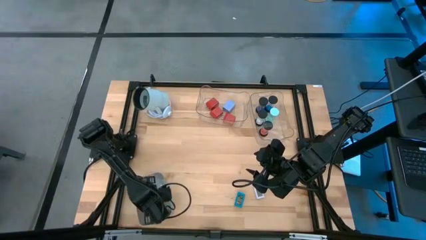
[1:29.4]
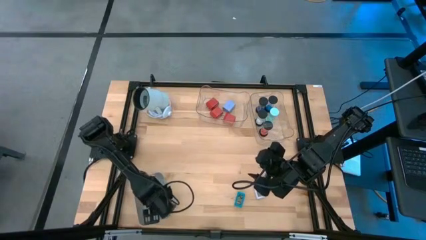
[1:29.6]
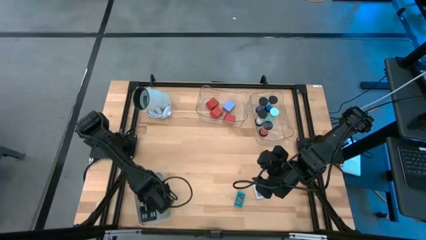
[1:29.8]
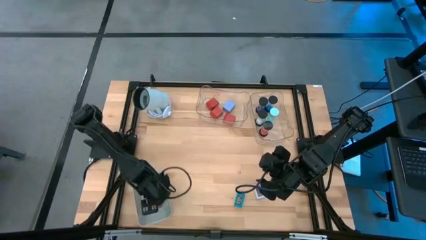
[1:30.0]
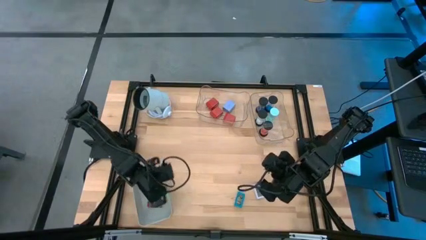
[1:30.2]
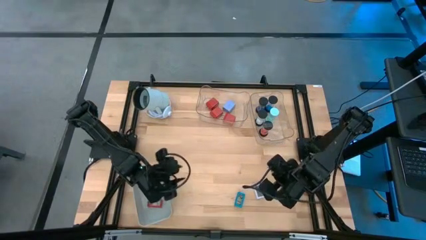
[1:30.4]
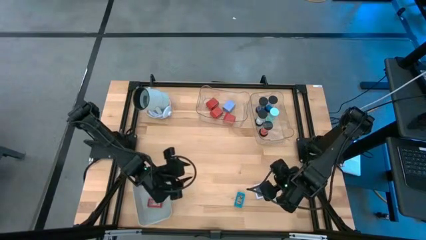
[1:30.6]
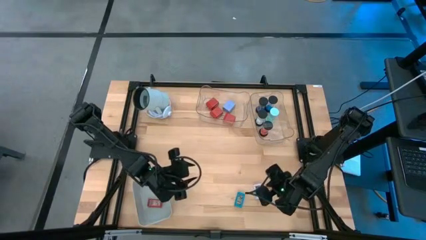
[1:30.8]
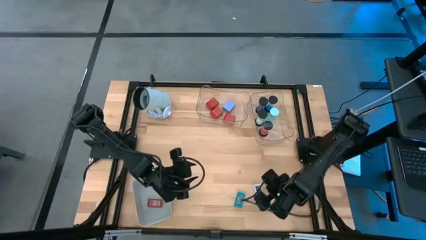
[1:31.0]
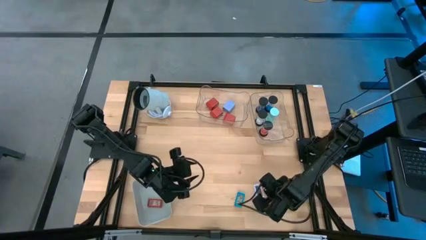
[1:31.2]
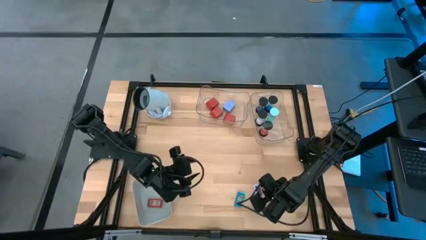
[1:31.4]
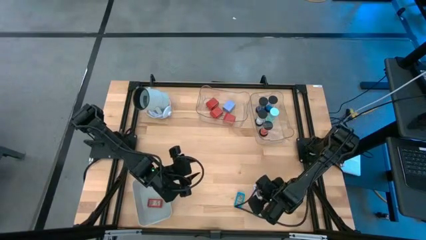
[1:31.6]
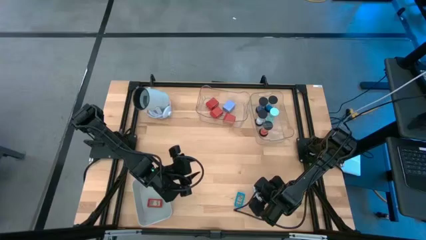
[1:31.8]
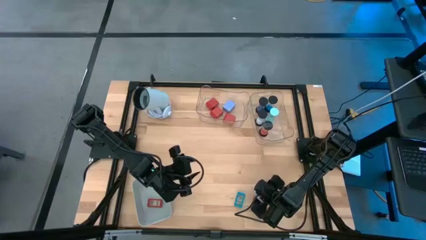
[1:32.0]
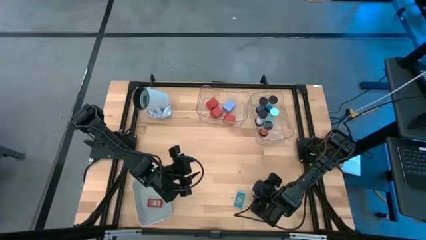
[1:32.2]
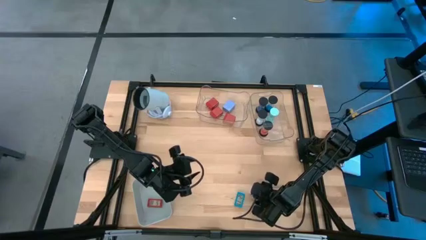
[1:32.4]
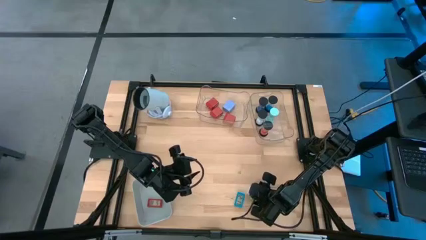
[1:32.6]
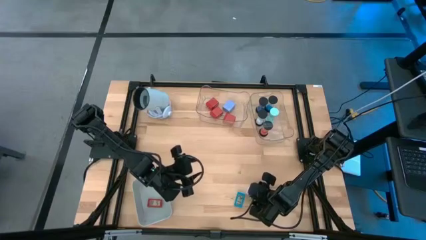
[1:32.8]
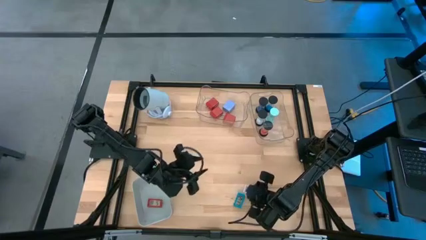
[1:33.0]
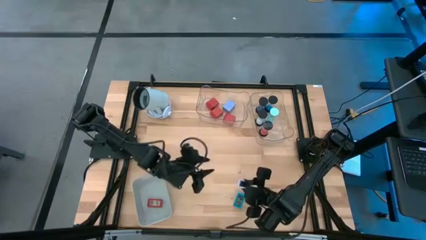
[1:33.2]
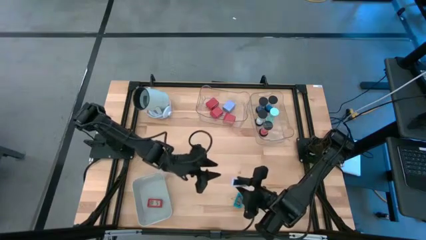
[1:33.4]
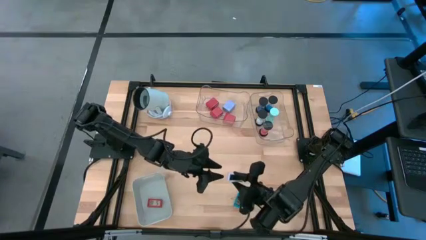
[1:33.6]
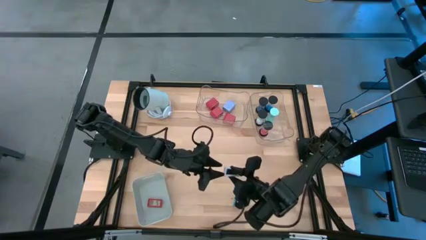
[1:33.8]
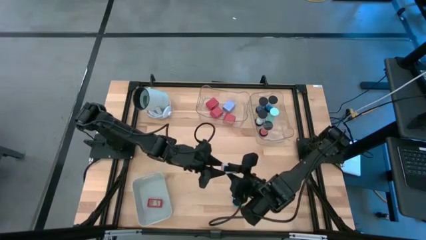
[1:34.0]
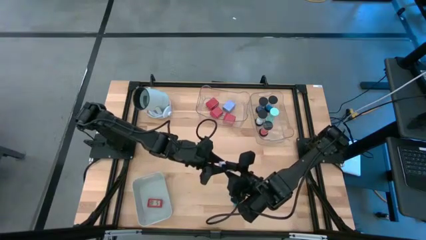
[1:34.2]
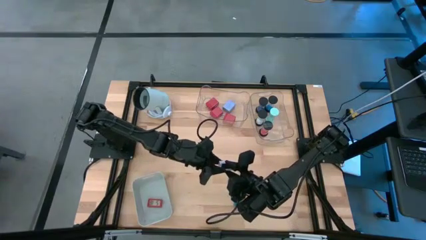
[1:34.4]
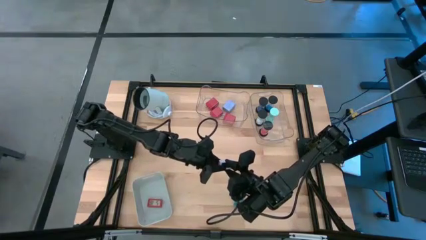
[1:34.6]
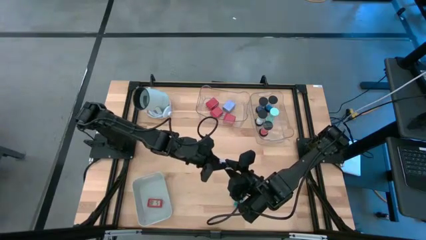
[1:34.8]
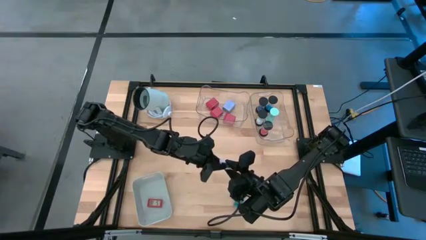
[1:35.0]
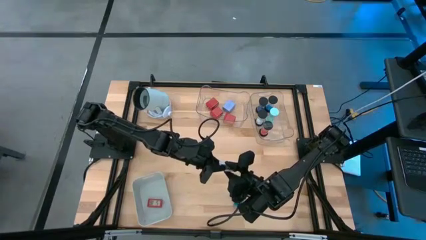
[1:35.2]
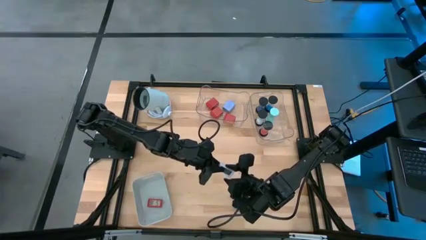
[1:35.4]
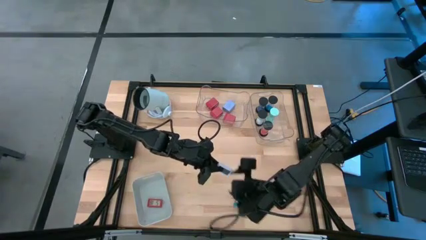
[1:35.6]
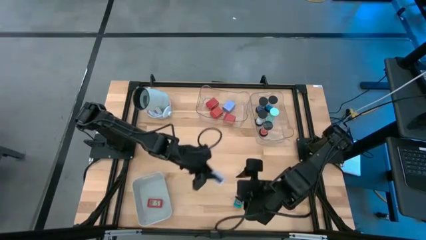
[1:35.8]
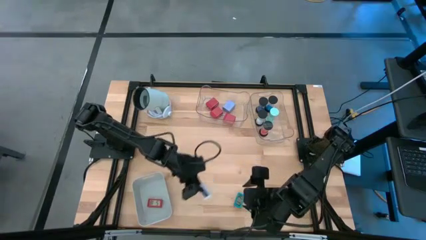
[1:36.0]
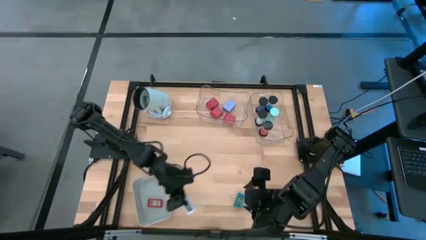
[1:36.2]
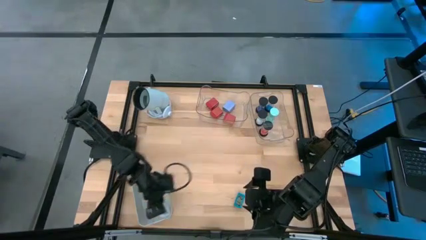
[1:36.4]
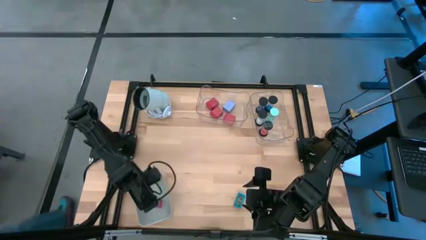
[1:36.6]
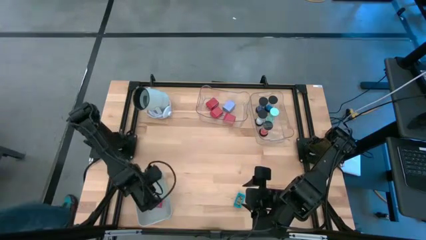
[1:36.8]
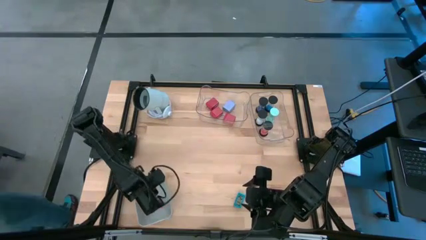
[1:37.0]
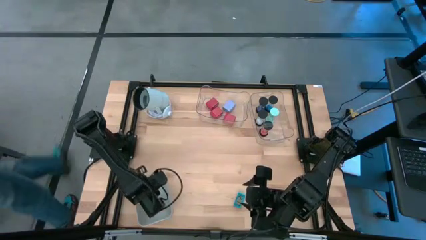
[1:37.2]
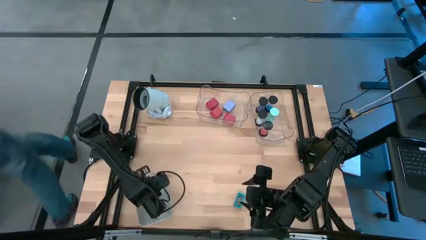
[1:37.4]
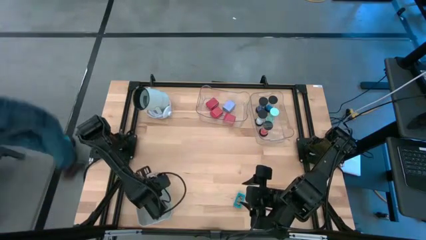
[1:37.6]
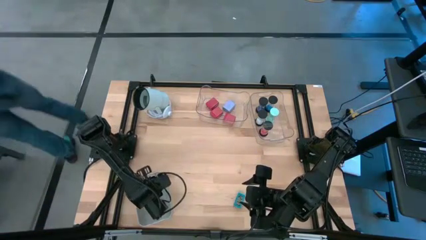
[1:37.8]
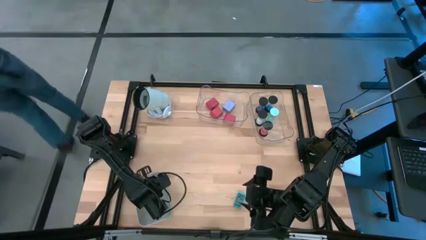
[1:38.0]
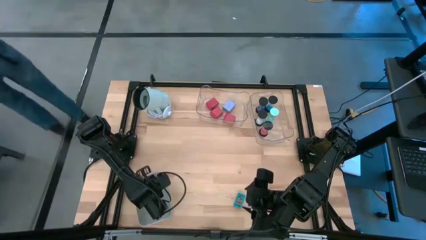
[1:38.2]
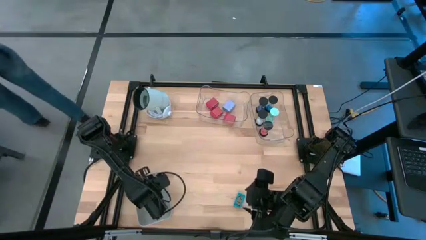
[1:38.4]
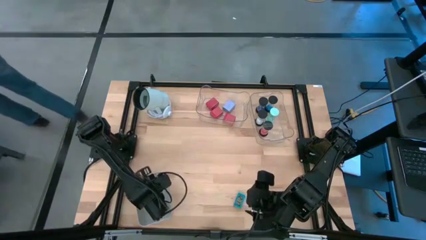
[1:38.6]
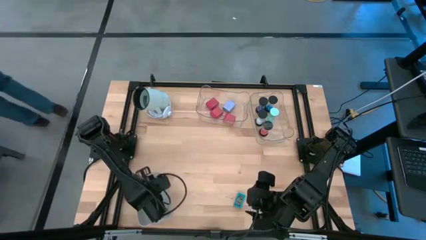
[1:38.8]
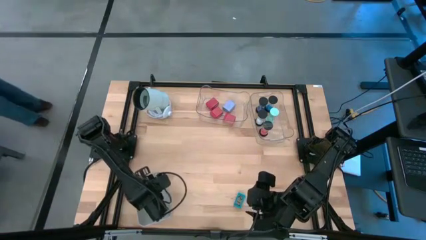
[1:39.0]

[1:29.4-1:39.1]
Task: Pick & Place Office items
Put the white digital clock into the gray bin

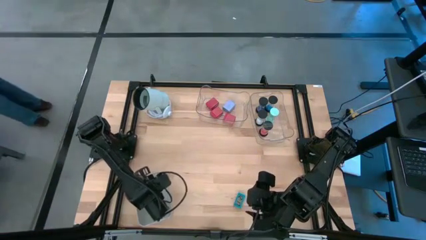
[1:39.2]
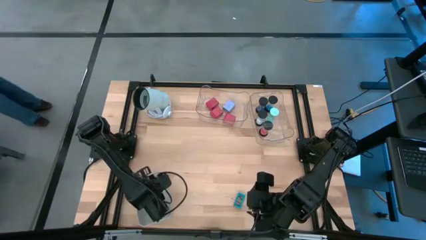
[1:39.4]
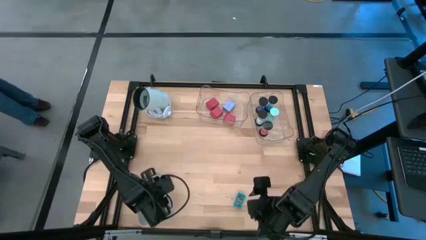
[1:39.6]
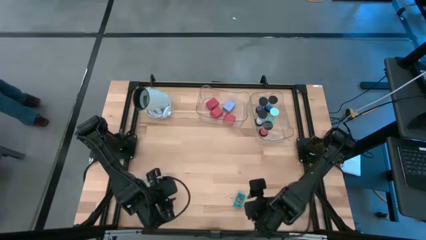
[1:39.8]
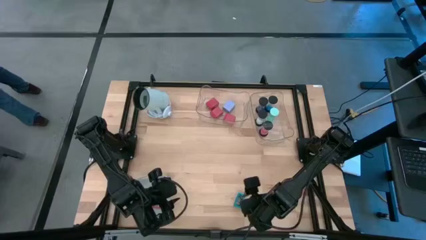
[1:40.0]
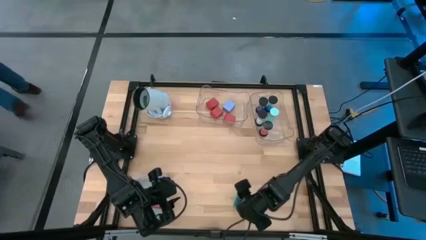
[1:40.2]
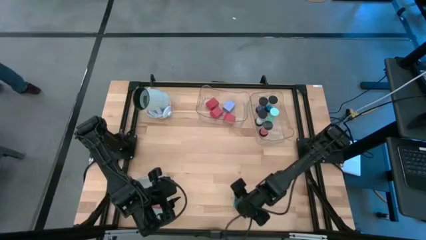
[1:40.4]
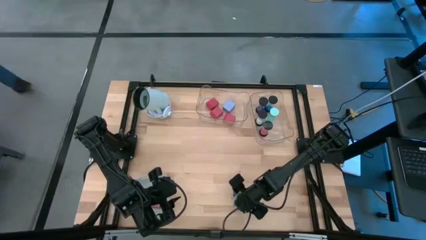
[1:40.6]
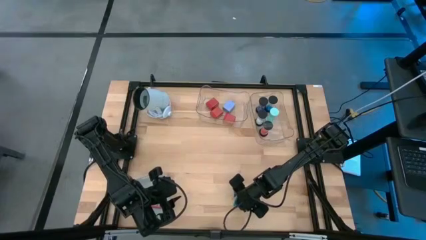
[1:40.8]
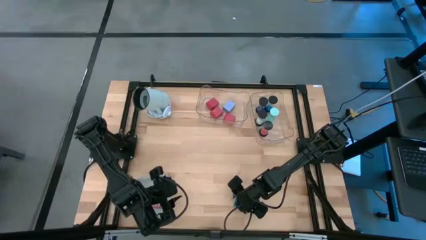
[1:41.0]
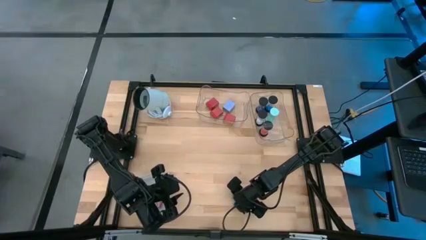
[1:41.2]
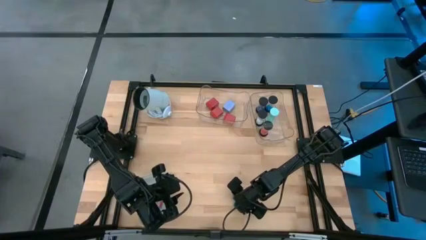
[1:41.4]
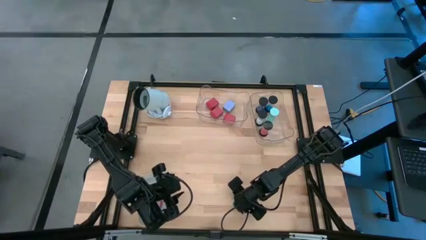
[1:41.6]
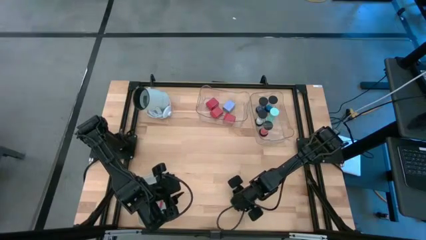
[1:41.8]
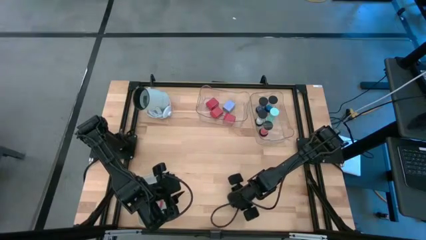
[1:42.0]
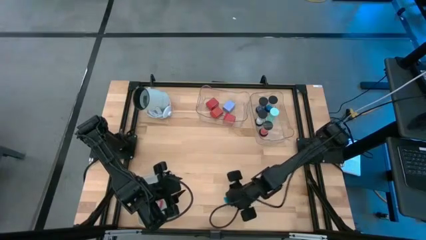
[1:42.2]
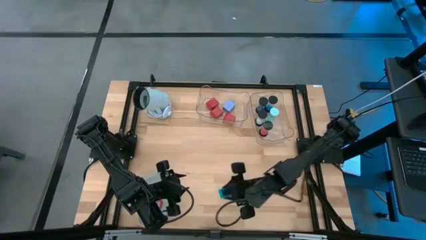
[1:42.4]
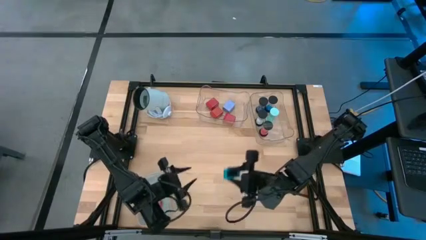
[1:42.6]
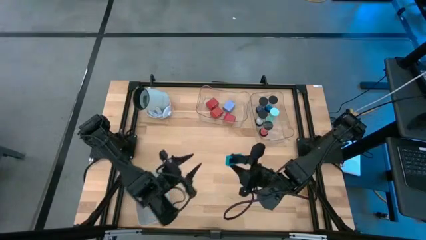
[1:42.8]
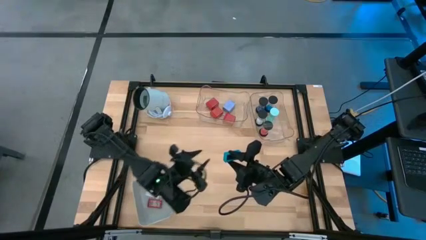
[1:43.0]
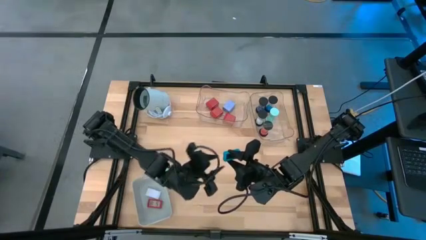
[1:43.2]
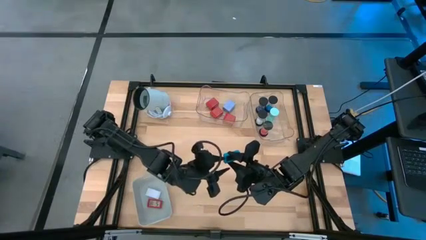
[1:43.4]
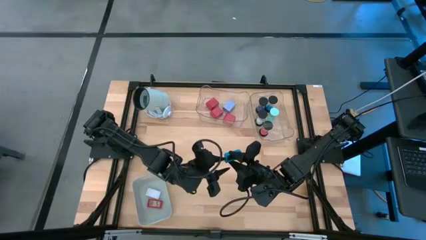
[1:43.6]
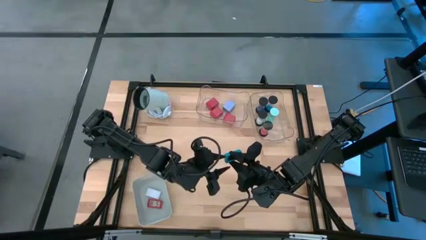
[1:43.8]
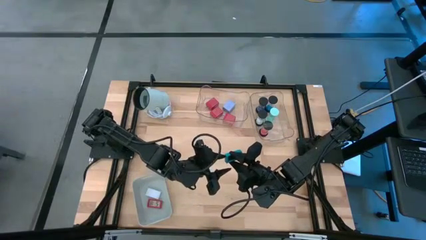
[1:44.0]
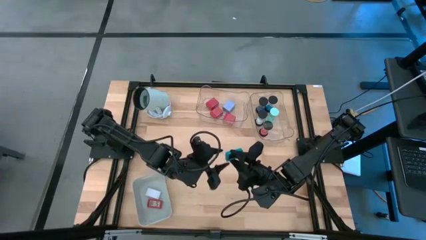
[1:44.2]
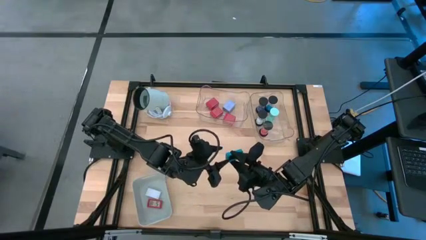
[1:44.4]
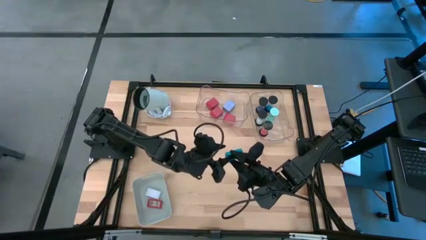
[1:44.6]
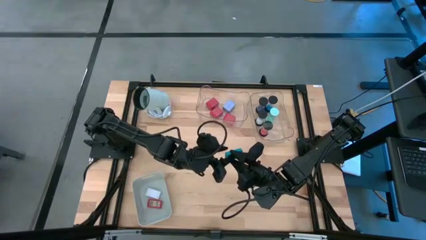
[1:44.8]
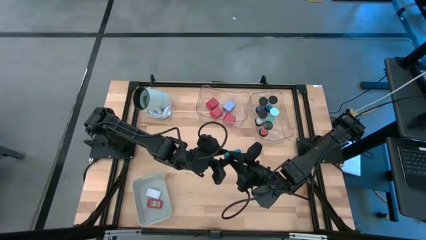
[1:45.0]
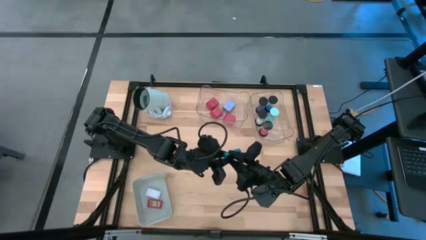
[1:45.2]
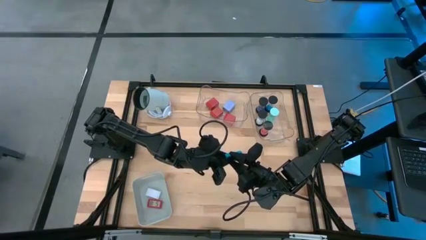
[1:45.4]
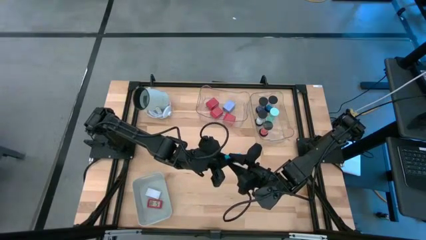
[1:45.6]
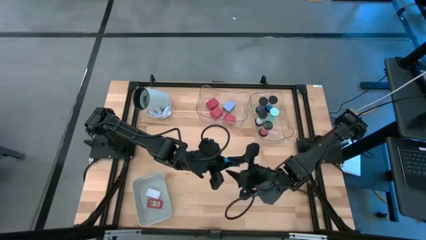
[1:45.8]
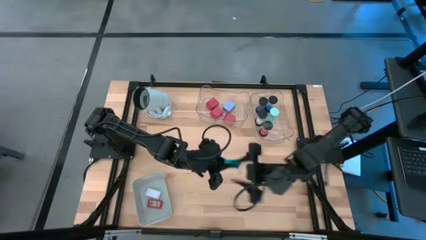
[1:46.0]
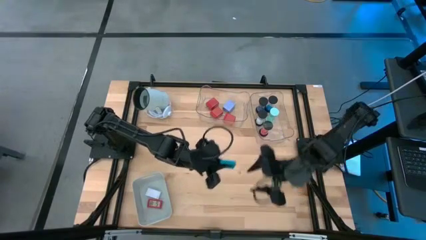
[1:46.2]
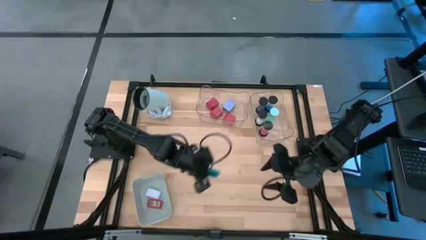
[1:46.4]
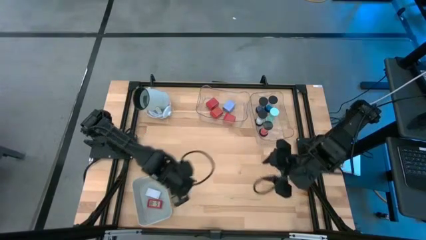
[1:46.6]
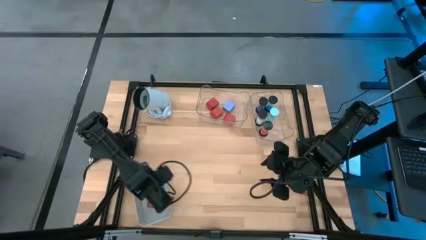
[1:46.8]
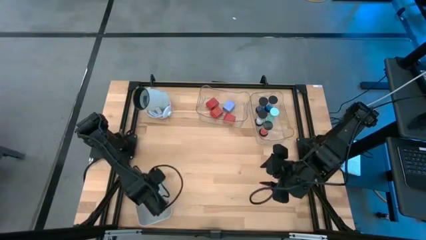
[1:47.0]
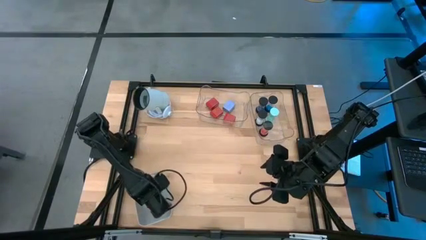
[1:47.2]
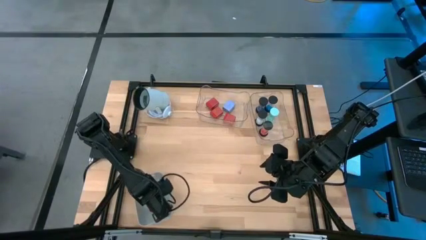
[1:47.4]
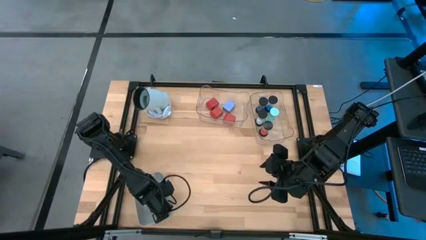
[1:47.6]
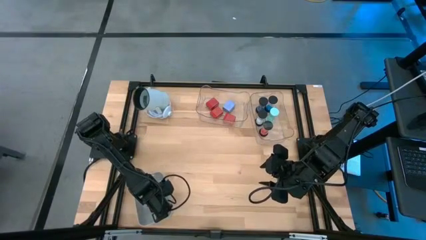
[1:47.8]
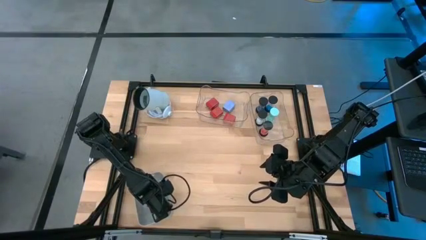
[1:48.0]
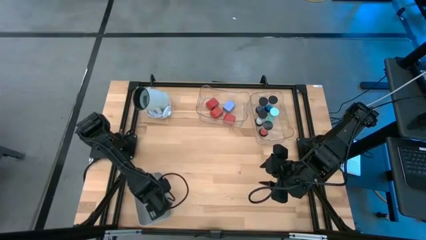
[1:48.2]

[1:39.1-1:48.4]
Put the blue digital clock into the gray bin
